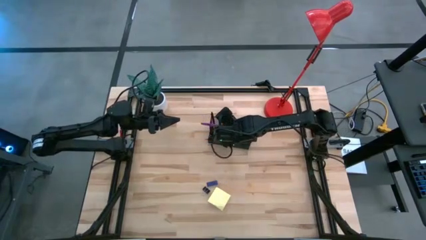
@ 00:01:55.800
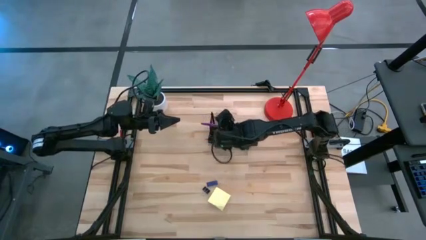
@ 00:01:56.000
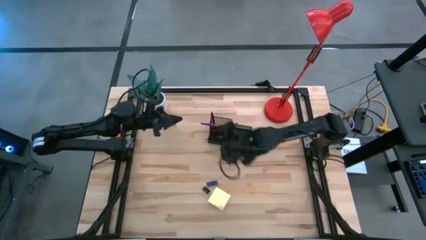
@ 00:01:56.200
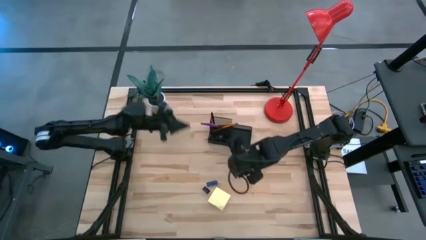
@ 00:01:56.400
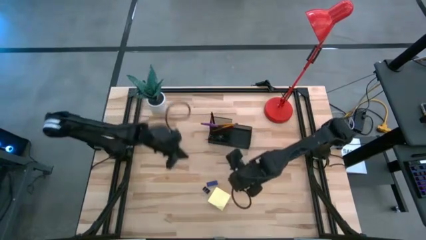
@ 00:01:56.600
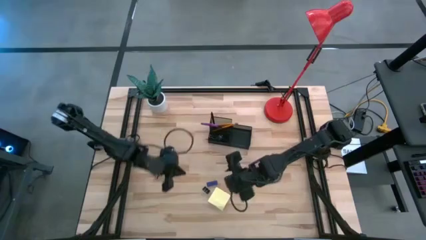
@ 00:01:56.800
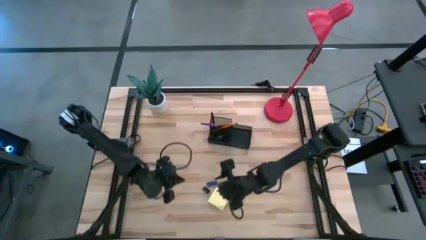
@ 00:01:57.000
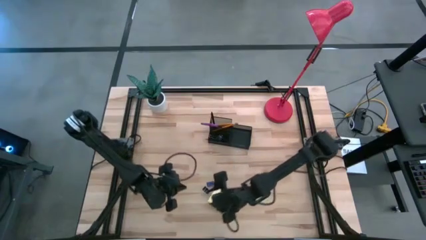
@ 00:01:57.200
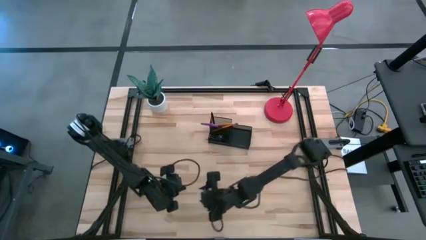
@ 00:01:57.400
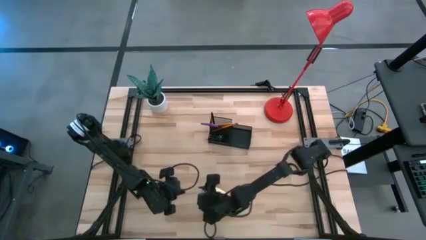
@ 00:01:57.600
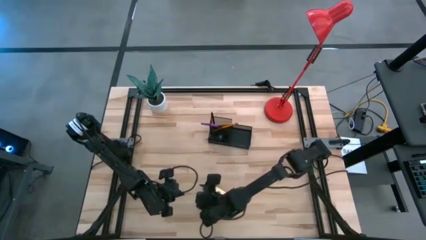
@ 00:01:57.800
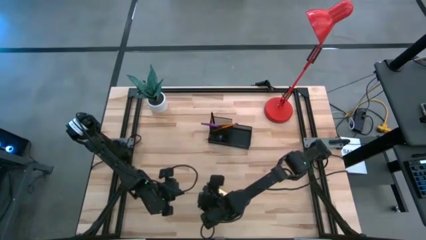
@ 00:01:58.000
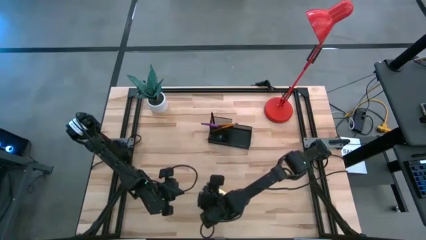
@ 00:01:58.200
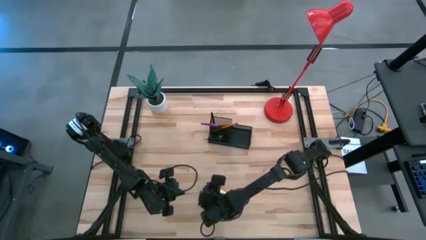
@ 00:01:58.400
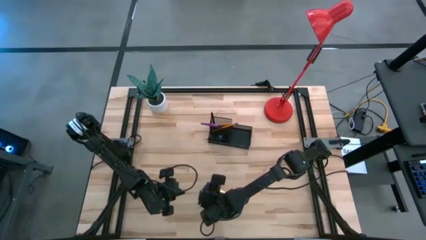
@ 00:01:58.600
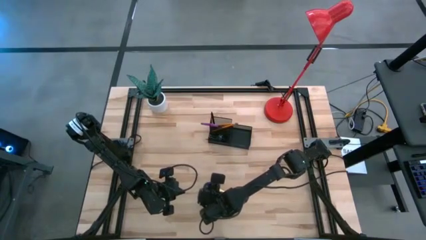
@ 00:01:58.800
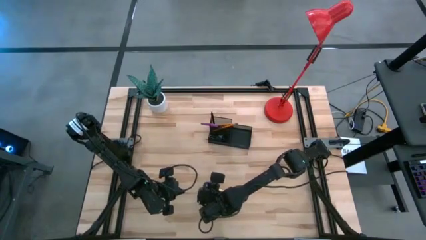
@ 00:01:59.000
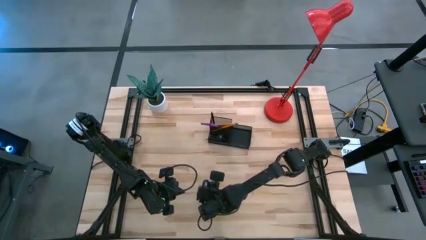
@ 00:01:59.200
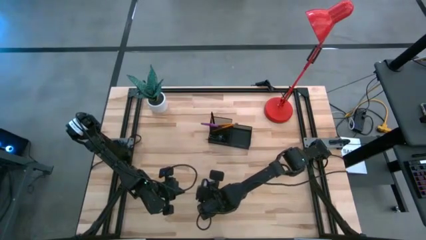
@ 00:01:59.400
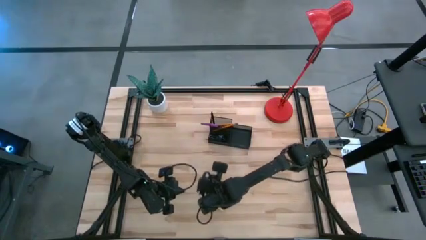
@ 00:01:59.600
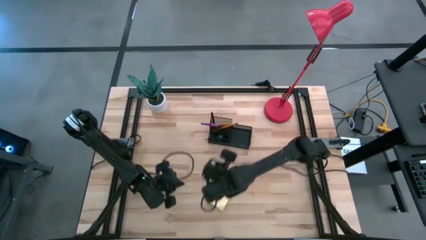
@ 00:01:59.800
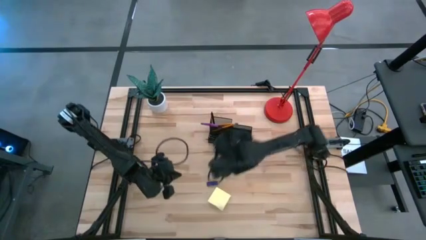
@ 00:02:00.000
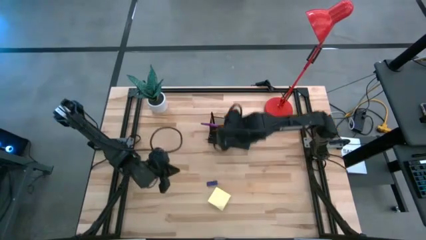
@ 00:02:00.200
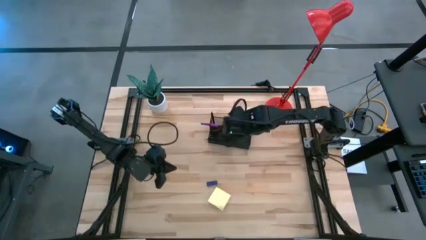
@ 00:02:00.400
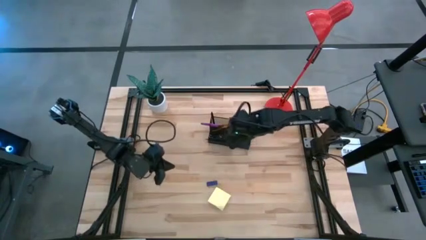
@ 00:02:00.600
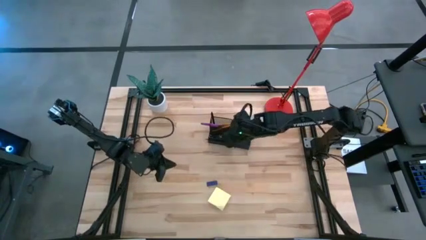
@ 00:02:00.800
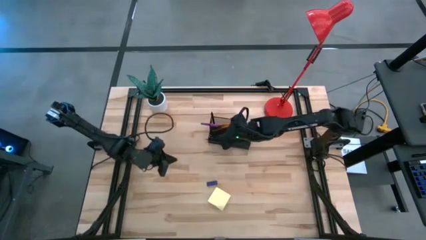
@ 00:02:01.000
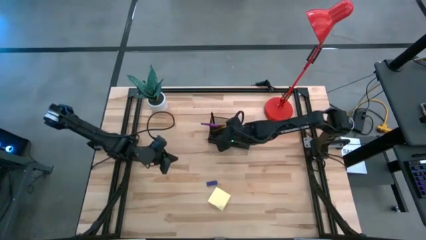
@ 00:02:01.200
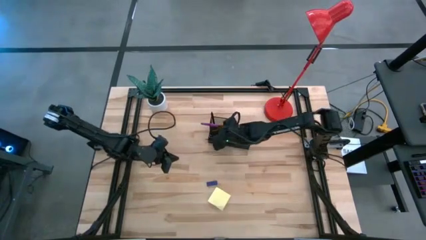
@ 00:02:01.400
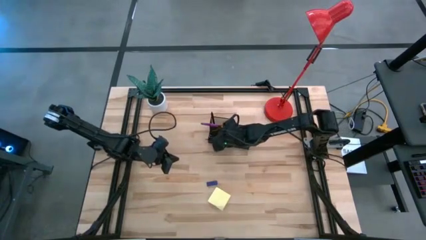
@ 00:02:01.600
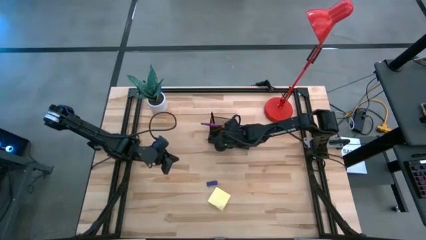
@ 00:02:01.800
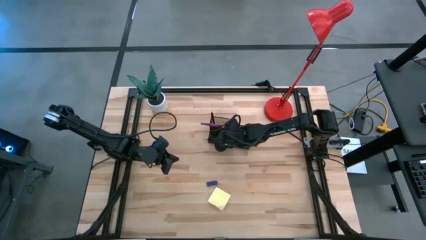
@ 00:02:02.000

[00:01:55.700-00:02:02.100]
Task: Pick and place office supplies into organizer
Put the black binder clip into the black desk organizer

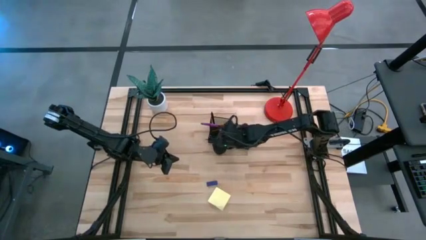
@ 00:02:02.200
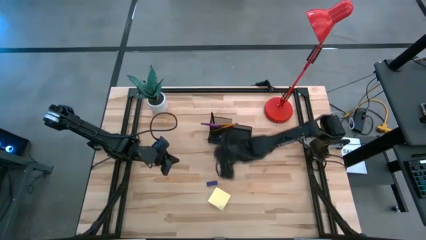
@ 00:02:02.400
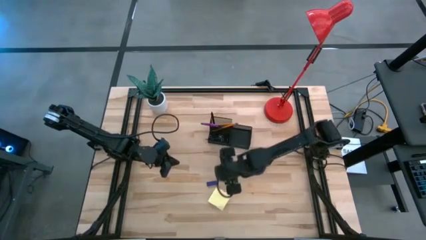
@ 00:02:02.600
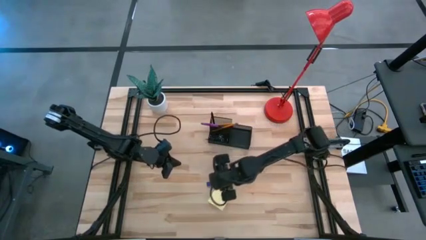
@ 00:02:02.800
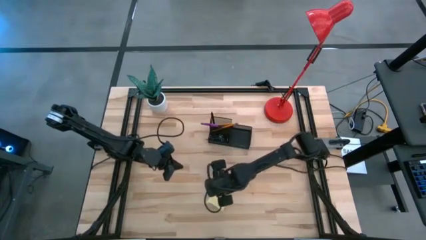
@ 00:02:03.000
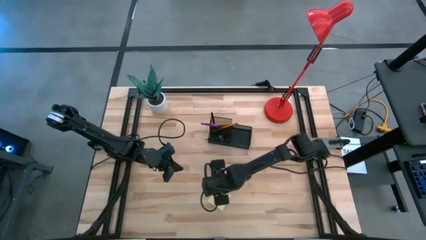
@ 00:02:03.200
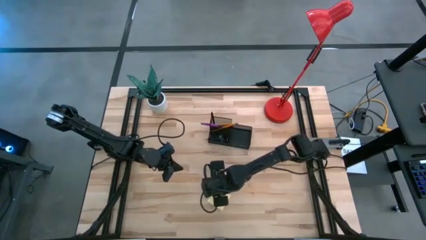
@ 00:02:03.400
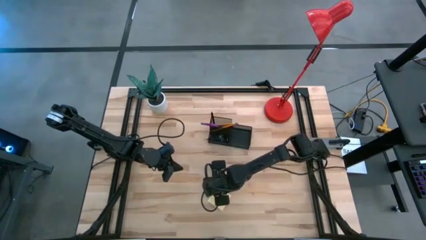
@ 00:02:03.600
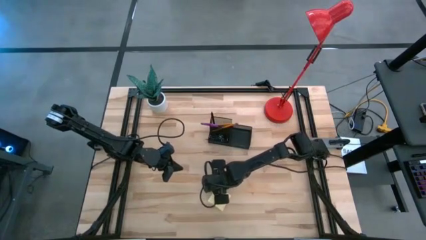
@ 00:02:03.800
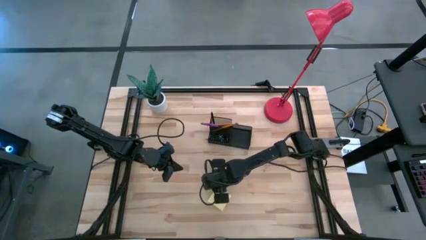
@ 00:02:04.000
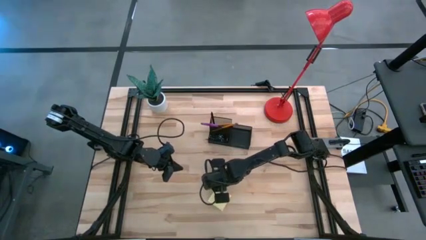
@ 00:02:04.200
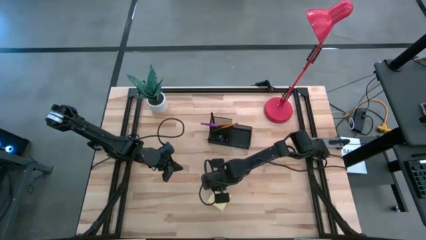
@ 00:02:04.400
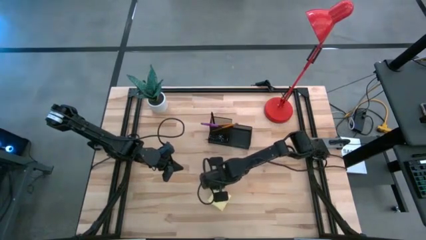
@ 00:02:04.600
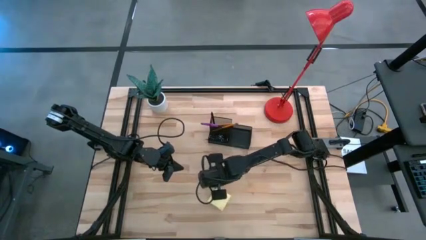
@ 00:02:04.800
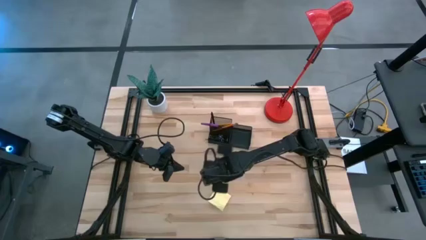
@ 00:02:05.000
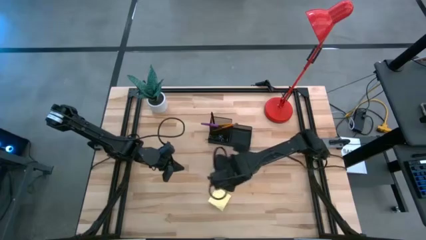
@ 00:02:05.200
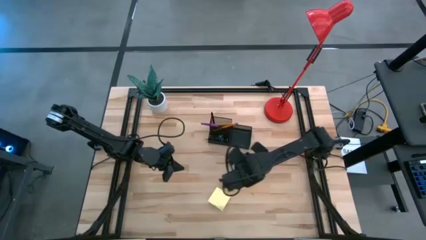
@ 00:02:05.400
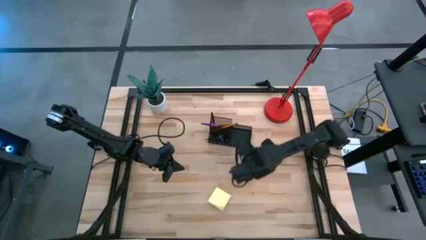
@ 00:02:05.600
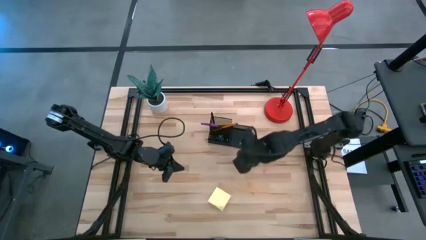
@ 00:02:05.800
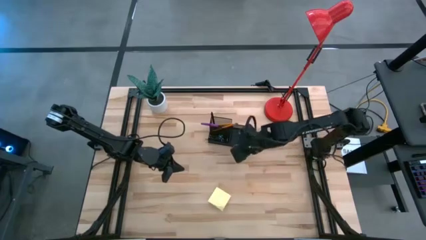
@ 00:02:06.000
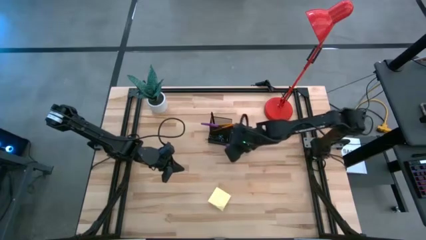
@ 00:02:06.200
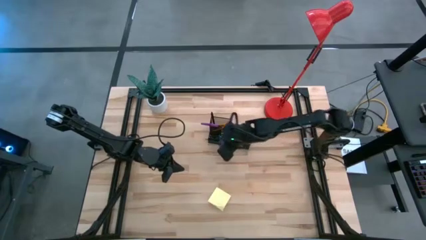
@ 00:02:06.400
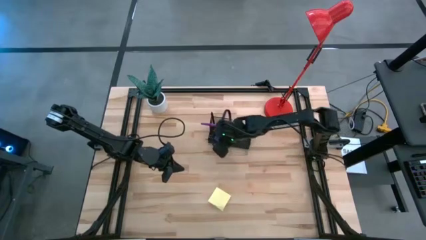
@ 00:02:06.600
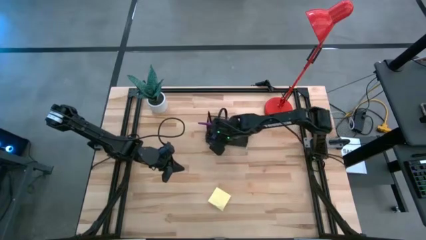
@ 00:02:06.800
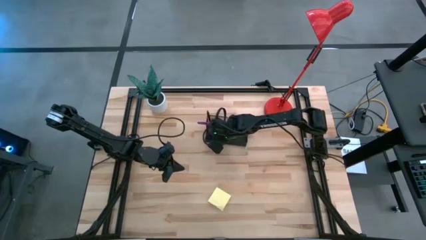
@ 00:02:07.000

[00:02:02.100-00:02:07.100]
Put the blue eraser into the black desk organizer

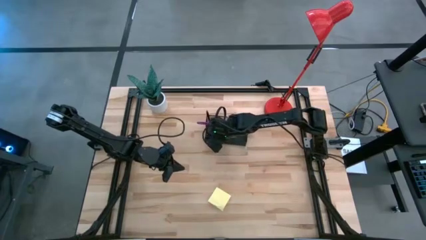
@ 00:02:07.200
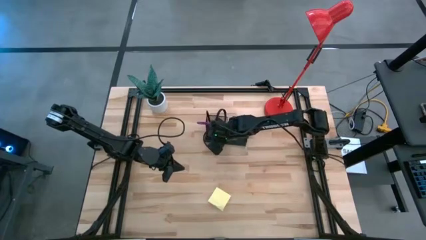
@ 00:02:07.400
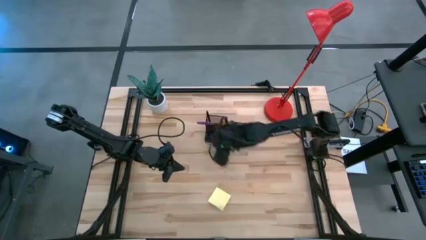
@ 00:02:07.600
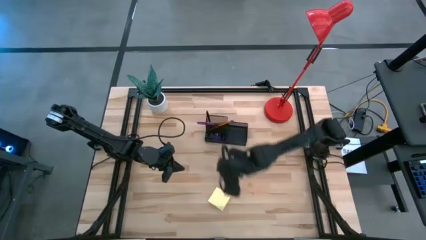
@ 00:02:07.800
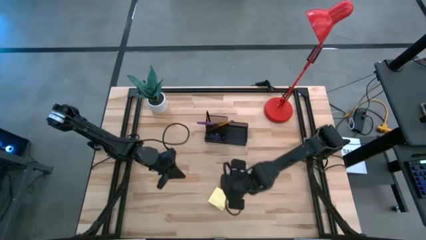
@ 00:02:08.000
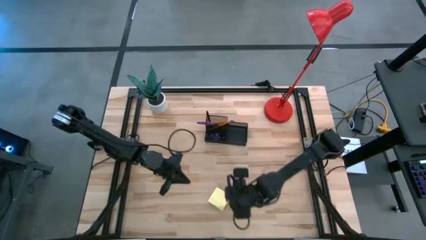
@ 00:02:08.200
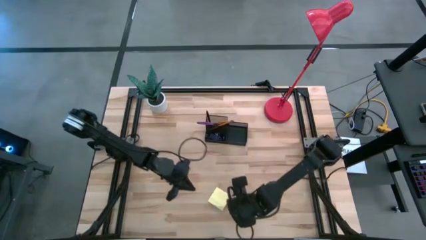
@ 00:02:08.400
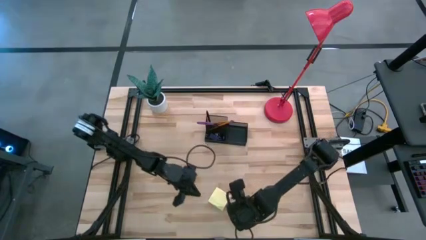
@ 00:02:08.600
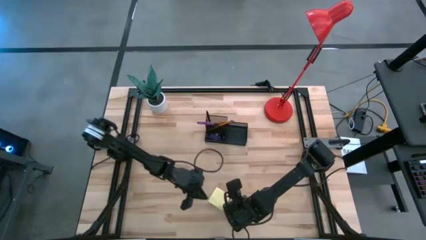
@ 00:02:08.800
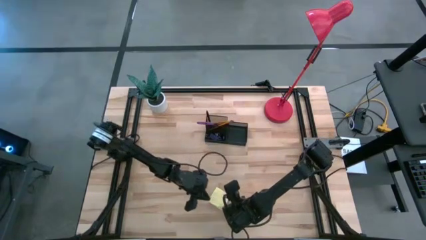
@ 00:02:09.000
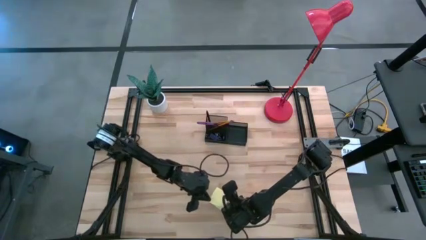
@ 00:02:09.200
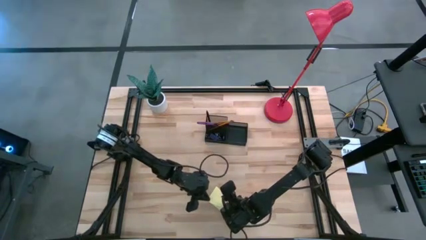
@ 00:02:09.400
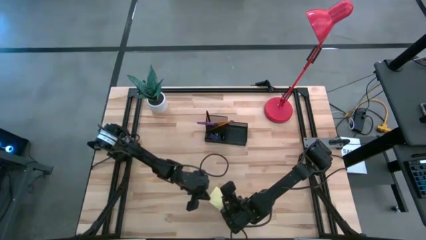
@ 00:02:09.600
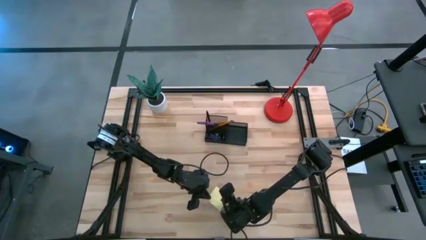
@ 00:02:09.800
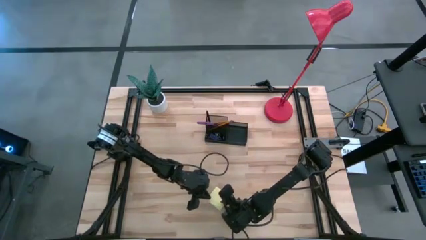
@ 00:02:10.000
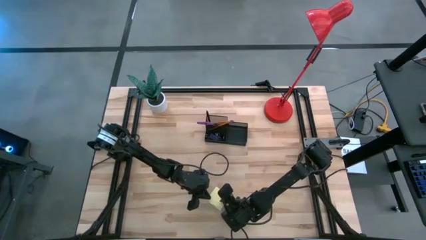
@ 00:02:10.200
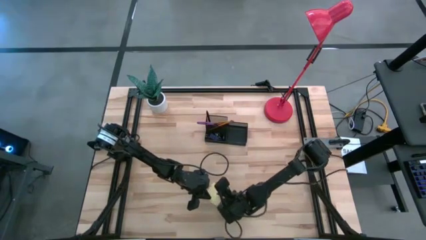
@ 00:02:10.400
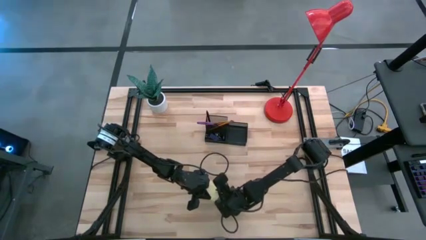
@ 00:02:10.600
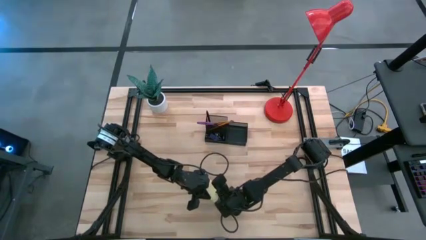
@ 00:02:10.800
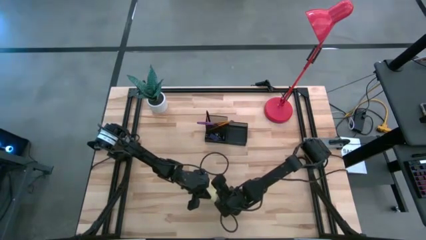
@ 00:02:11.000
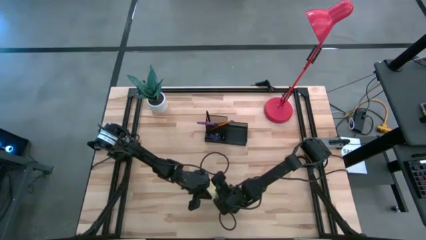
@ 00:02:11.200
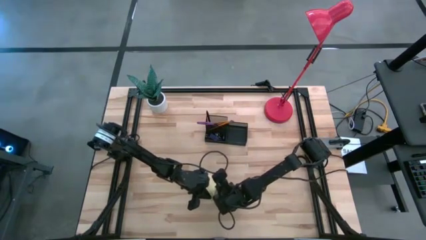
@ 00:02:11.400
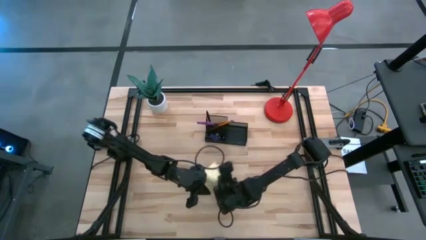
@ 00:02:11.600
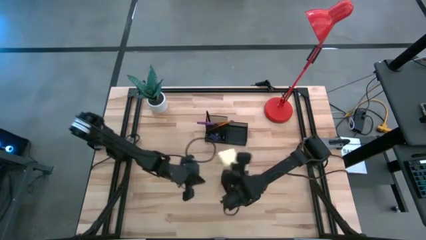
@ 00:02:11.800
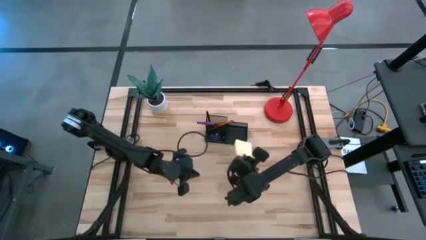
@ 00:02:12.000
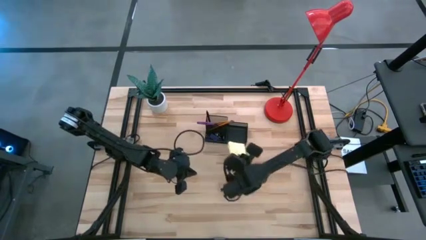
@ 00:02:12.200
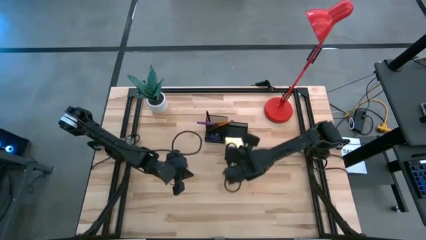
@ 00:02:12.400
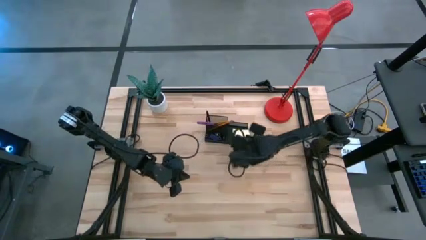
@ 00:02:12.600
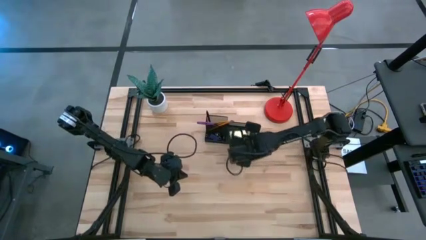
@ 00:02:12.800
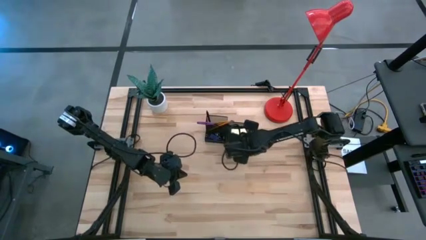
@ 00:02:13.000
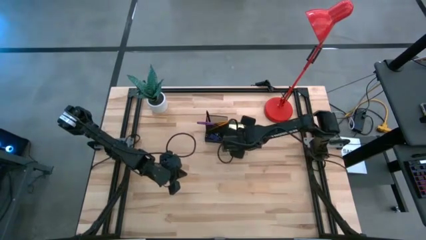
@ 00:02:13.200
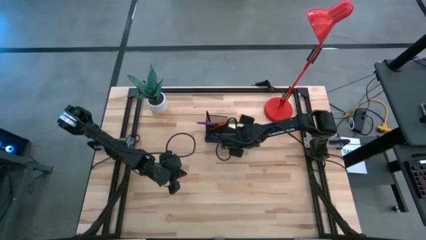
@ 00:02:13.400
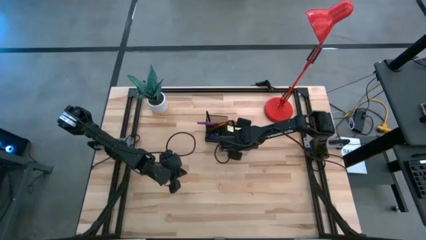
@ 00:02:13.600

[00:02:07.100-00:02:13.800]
Put the yellow sticky note pad into the black desk organizer
